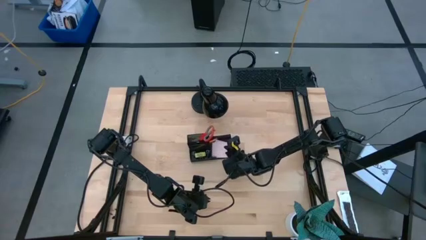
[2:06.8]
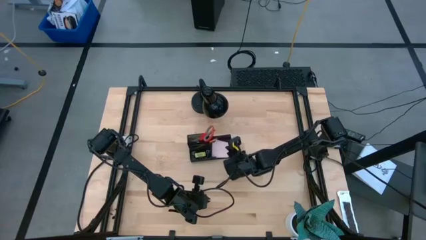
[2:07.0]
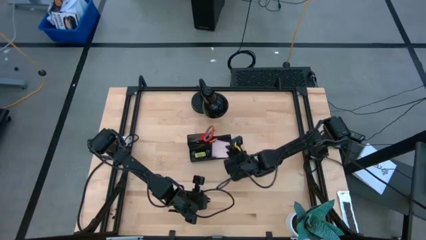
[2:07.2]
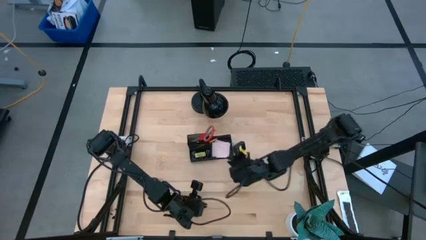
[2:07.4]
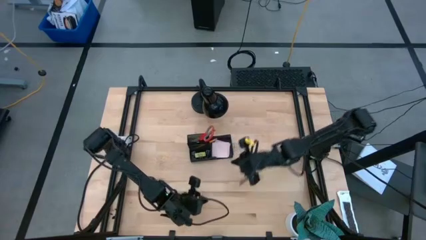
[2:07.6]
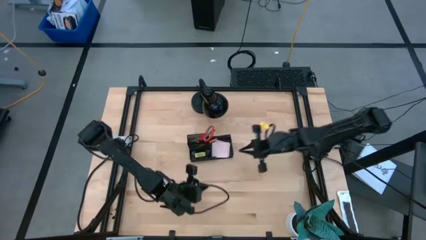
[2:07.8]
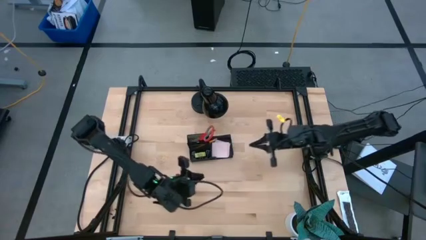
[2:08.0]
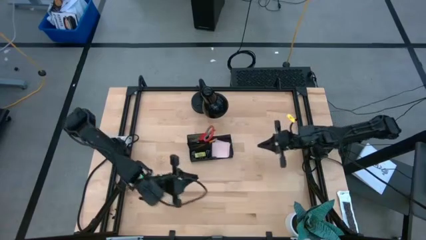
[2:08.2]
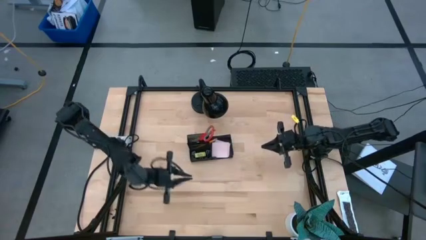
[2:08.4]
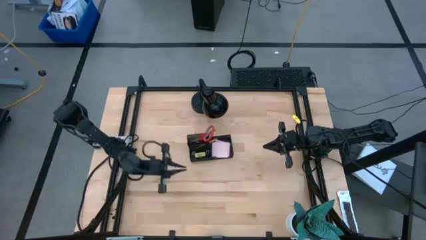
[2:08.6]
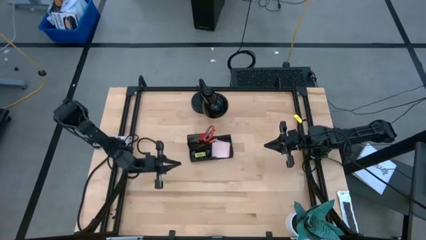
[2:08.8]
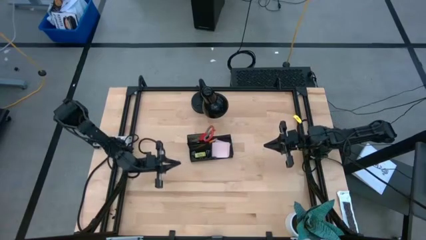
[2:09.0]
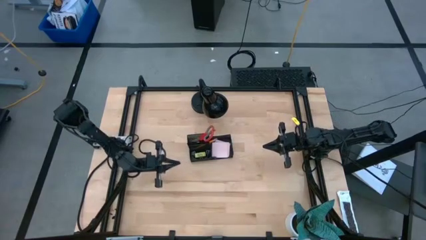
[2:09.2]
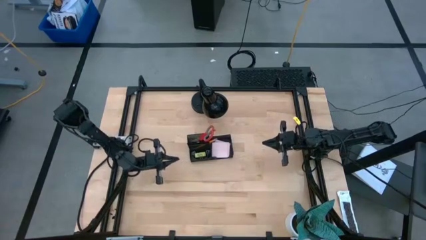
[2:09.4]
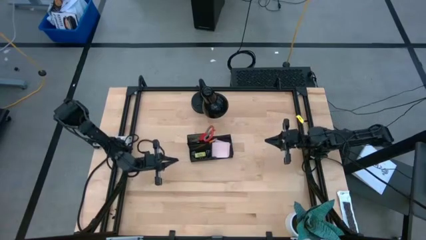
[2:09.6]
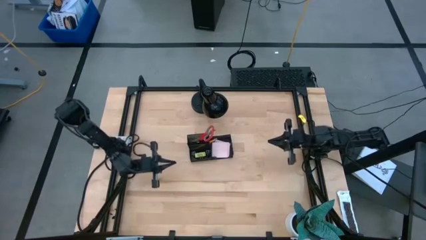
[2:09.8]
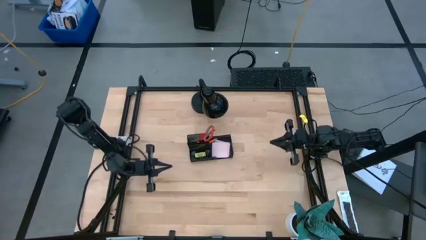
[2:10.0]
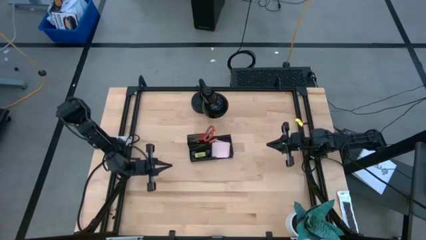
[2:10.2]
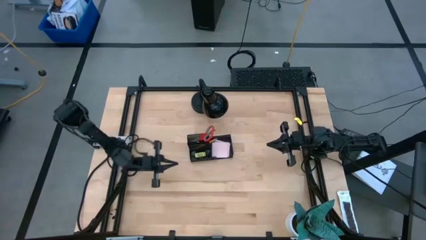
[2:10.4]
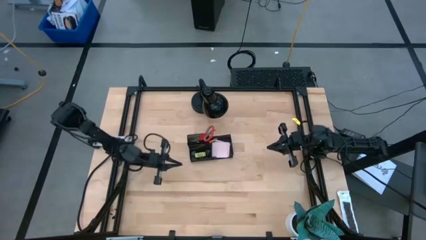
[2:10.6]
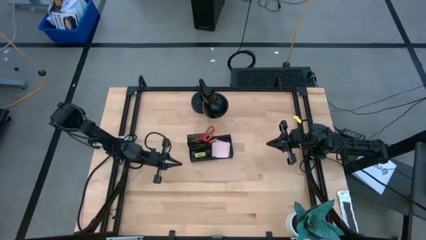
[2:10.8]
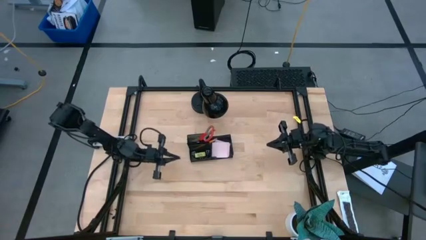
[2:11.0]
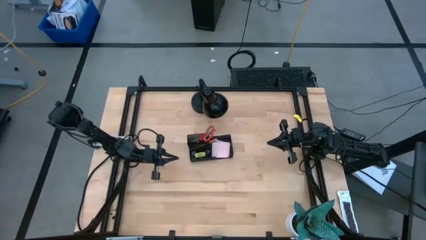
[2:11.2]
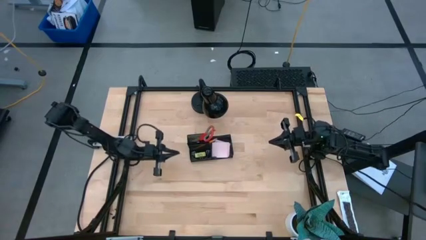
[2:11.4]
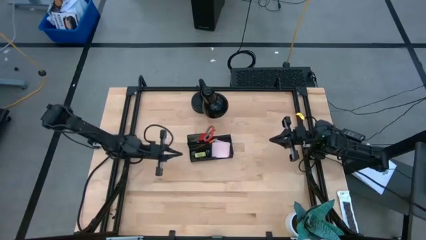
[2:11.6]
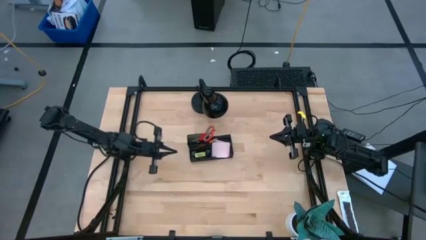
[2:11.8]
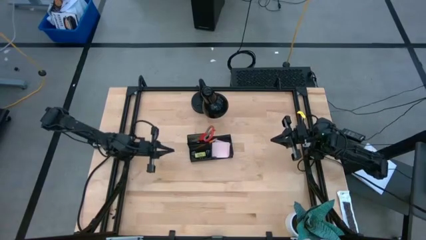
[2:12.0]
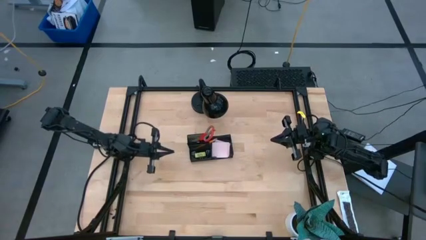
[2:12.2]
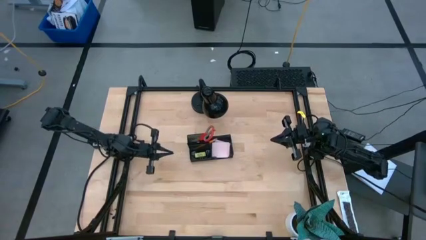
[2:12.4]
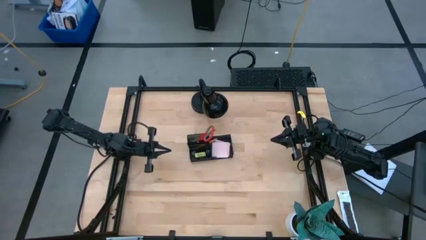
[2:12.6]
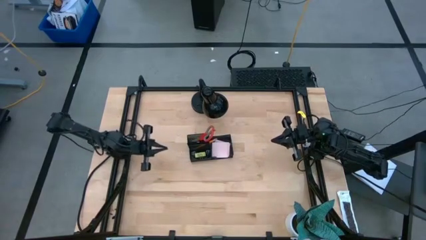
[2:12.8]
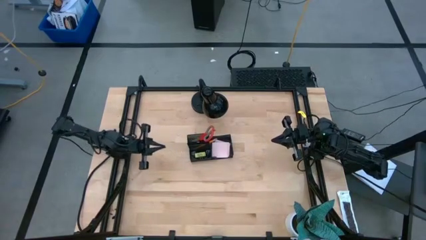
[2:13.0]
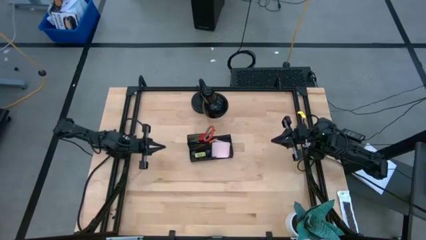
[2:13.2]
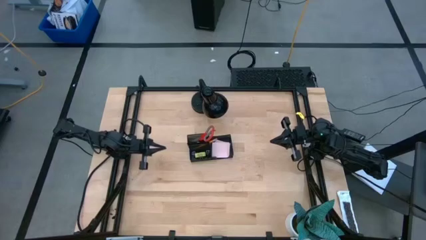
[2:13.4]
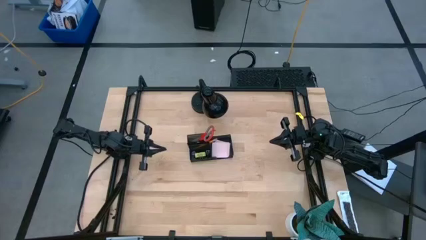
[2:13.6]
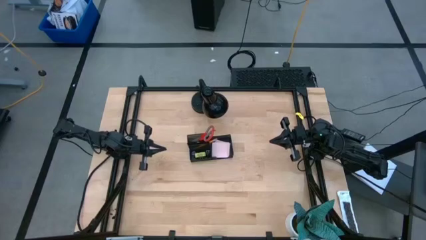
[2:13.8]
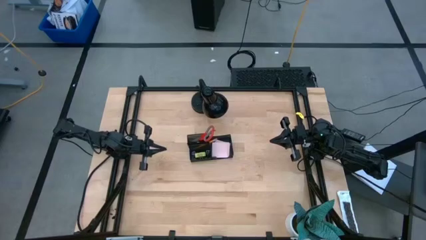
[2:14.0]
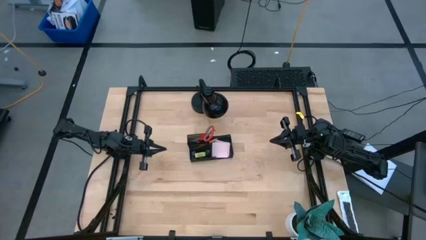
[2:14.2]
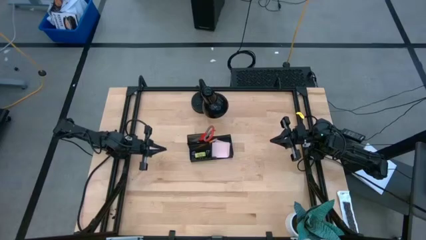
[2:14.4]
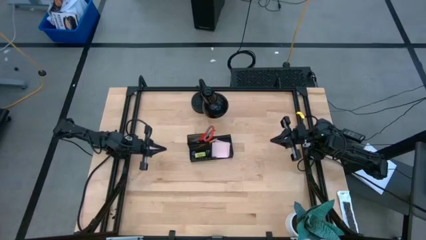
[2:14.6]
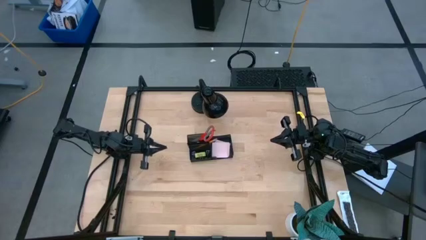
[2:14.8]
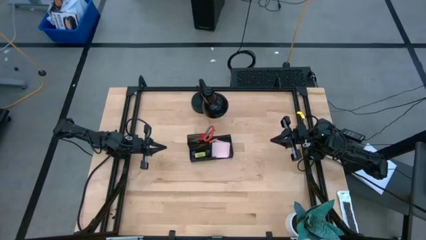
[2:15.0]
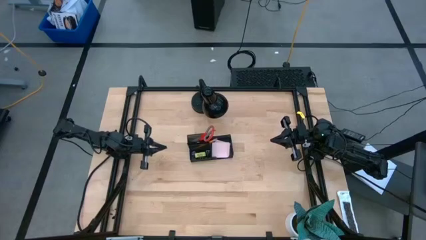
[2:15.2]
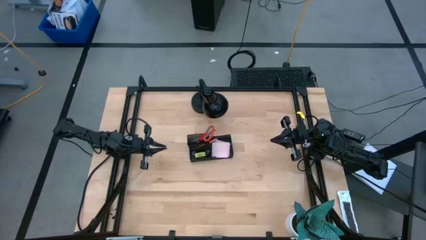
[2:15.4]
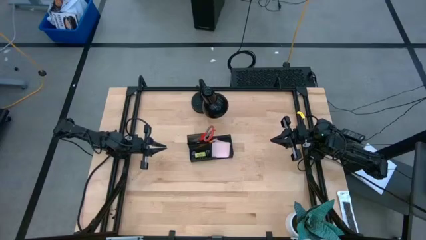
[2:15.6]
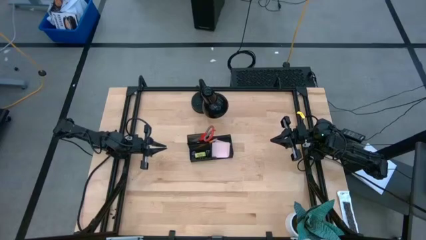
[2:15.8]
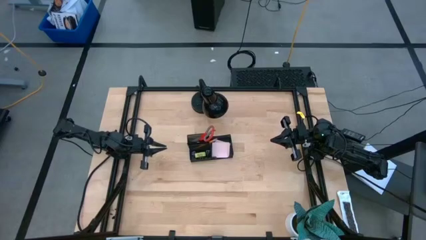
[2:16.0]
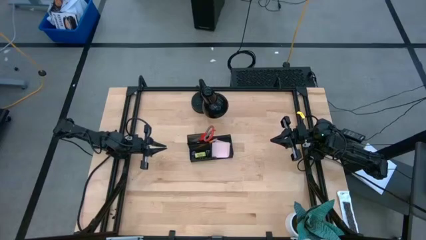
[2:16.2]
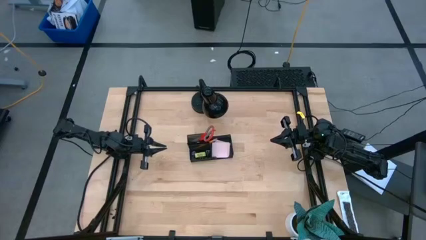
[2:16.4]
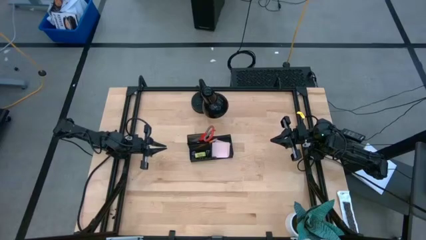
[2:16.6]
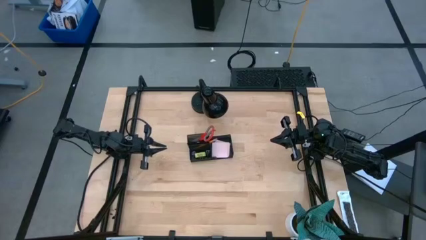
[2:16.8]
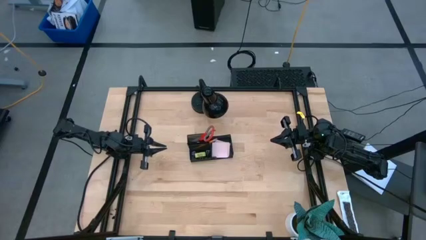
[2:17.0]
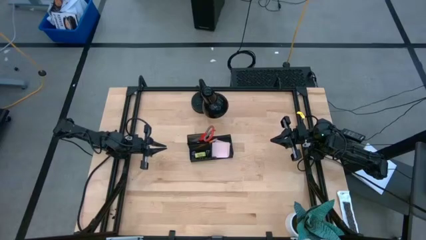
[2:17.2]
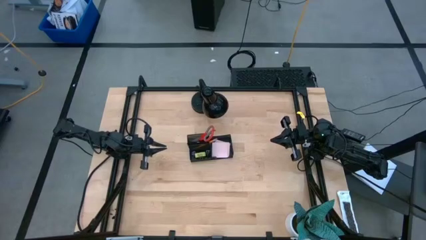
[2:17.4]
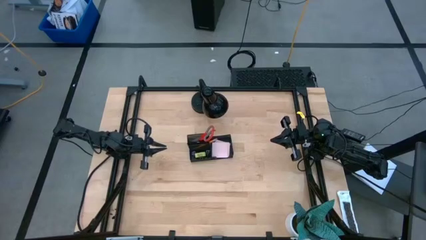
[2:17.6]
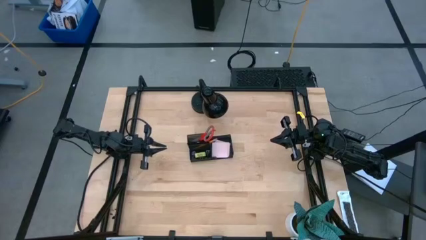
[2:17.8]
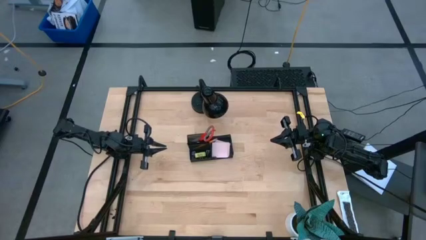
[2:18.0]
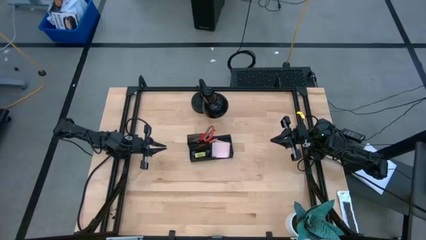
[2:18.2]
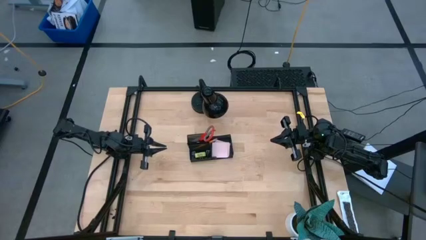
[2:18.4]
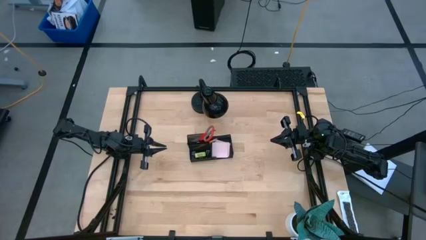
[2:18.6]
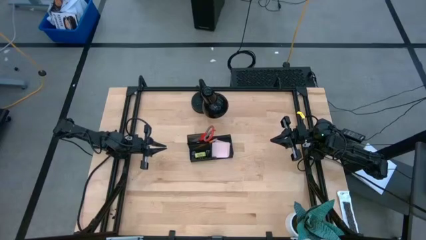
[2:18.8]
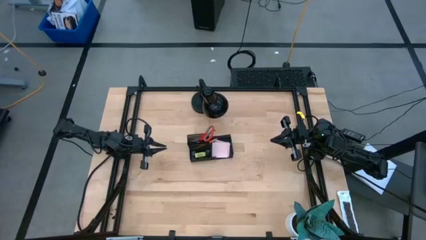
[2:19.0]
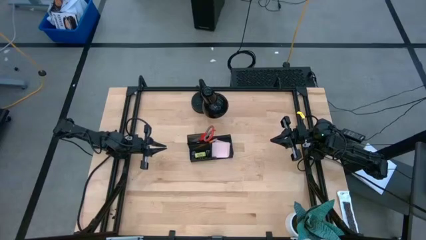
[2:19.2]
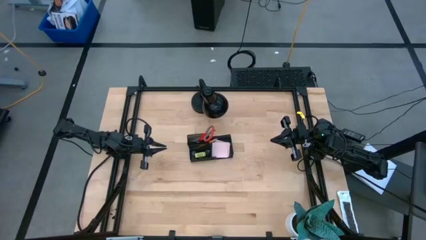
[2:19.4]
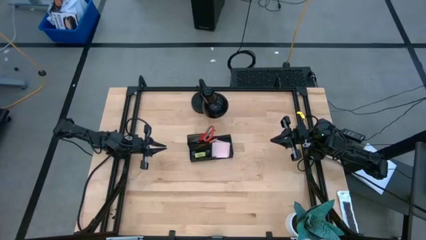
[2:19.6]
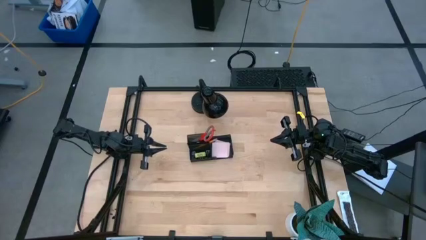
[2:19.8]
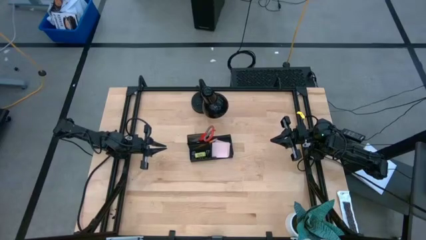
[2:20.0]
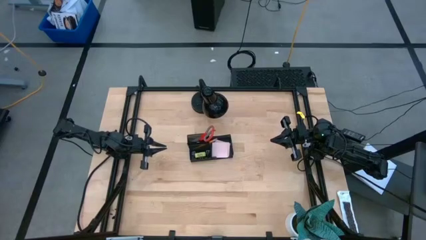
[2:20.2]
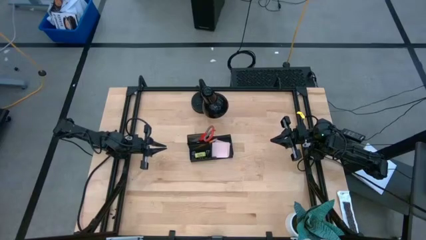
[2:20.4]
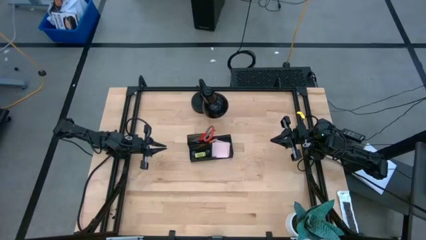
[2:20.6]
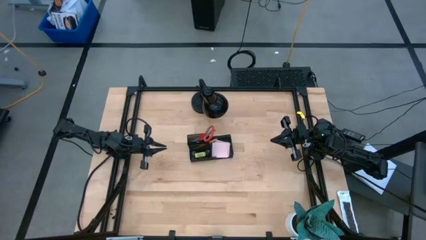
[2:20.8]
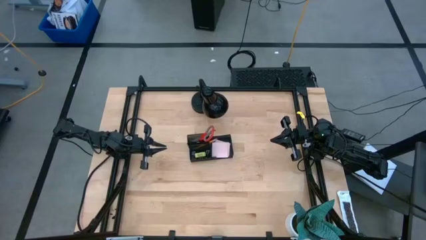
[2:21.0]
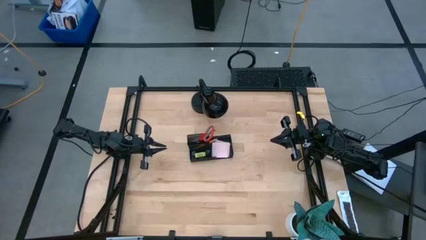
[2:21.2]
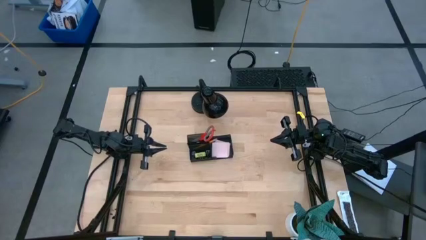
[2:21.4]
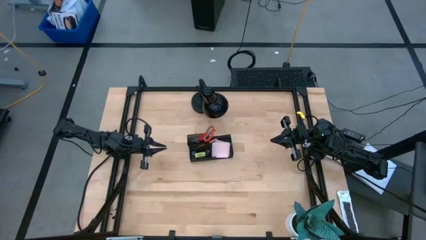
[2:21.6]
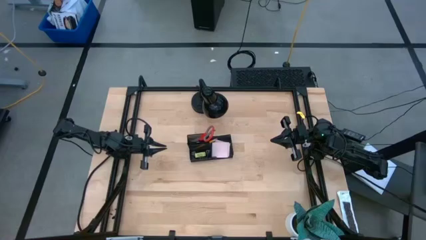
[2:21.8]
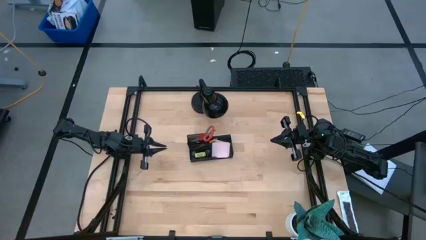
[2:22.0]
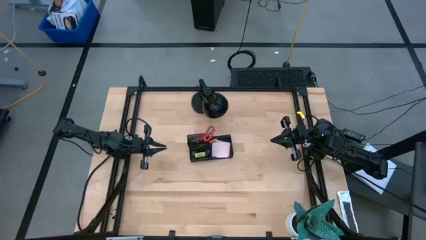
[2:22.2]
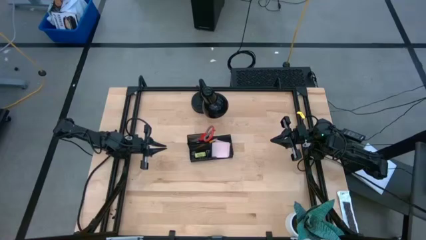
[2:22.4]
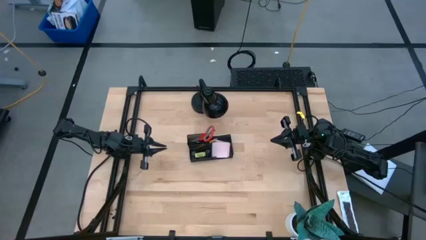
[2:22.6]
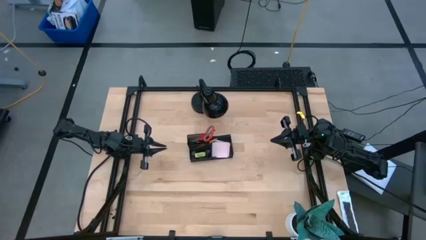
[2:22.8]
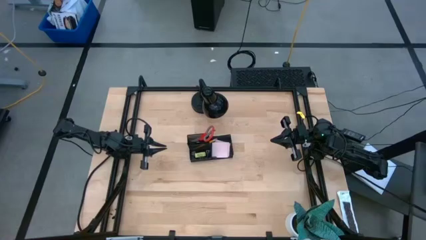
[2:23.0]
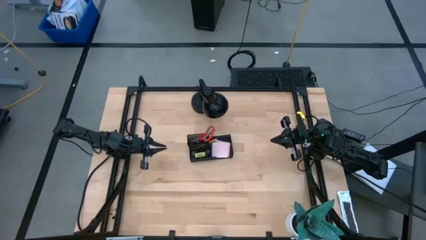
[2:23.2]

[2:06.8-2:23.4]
Task: Pick and place office supplies into organizer
Return to Home Position

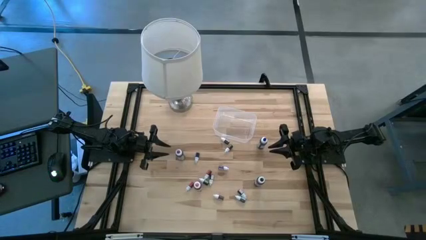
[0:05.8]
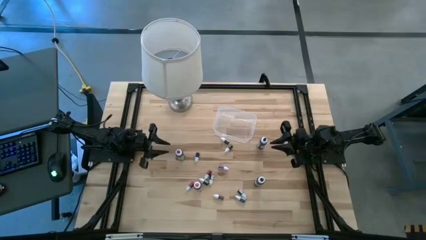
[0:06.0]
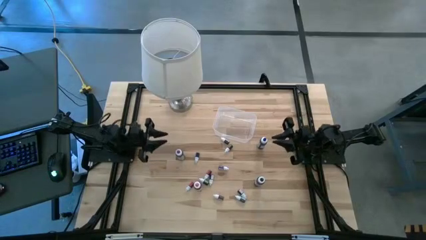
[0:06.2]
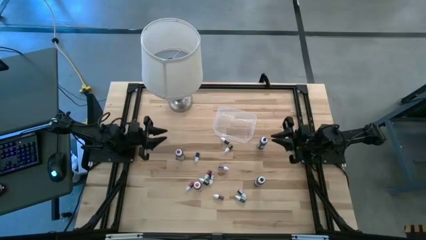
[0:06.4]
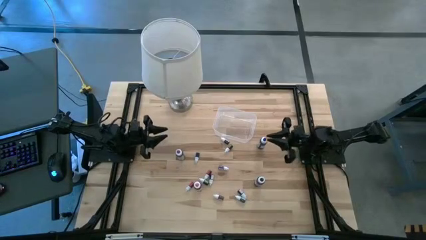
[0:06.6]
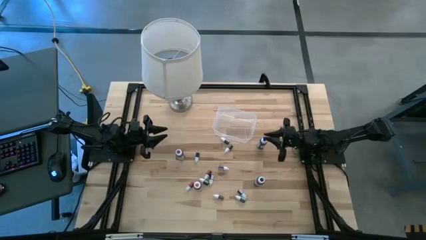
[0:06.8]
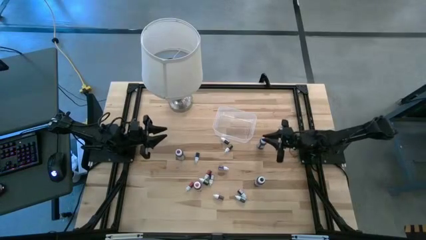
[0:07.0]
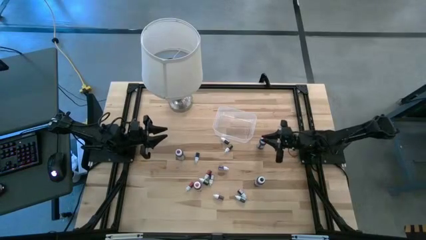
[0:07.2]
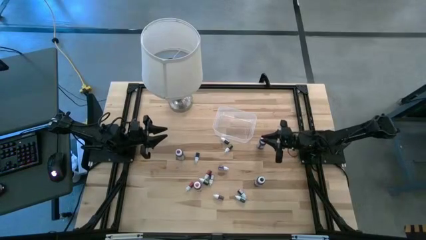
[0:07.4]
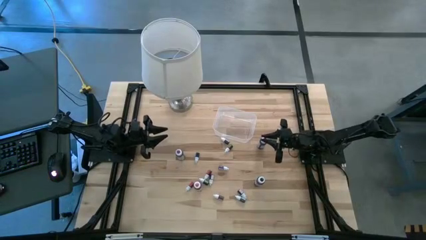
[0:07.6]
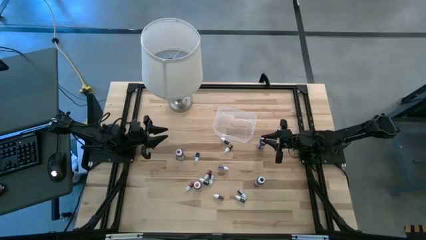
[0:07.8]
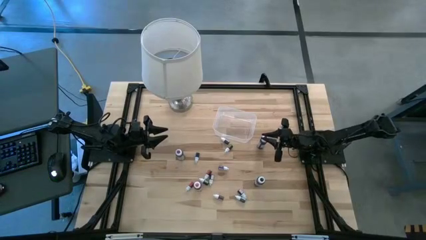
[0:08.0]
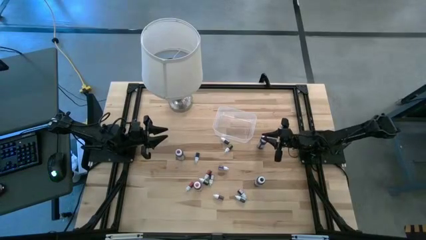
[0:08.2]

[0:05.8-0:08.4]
Task: Pick & Place food coloring
Put the large blue food coloring bottle into the transparent bin
